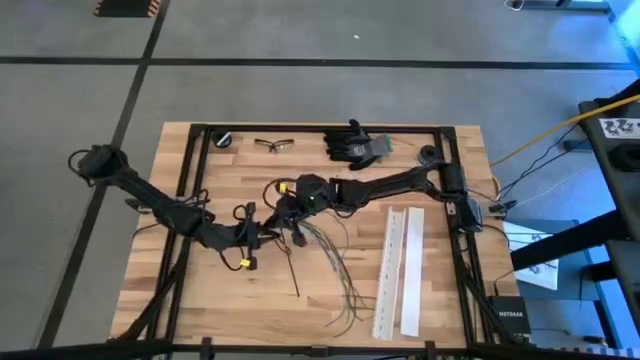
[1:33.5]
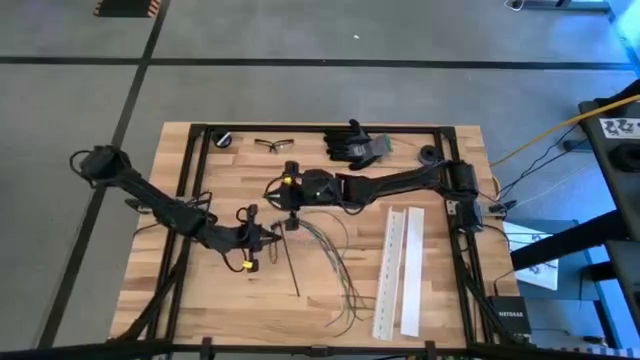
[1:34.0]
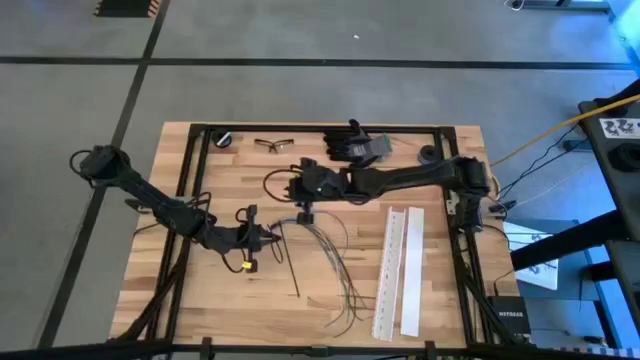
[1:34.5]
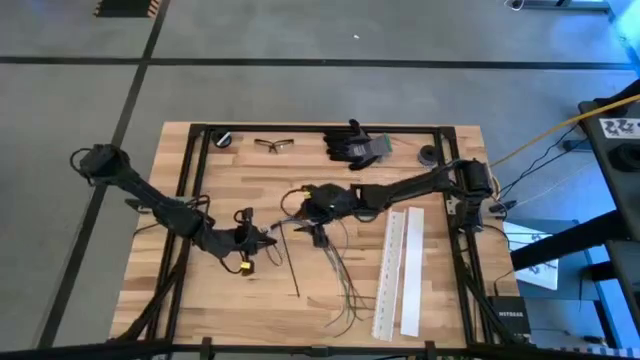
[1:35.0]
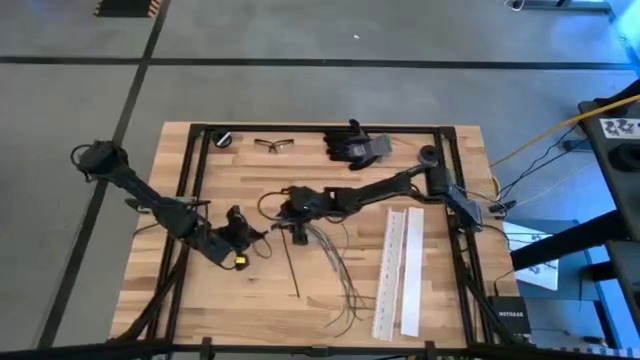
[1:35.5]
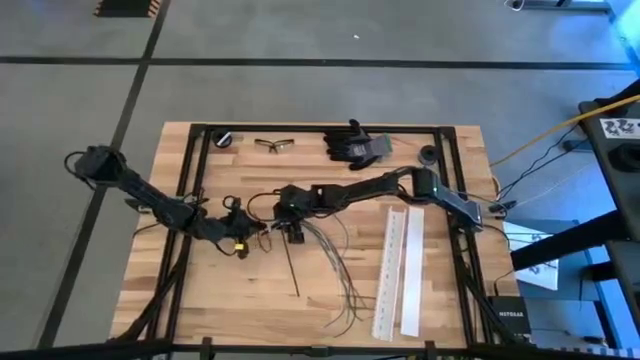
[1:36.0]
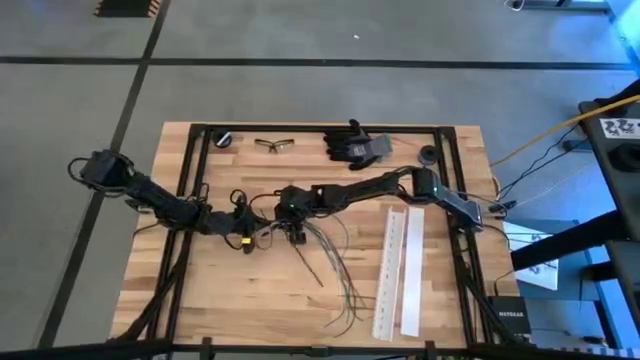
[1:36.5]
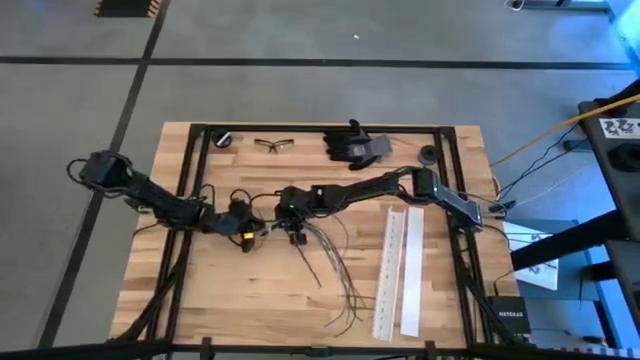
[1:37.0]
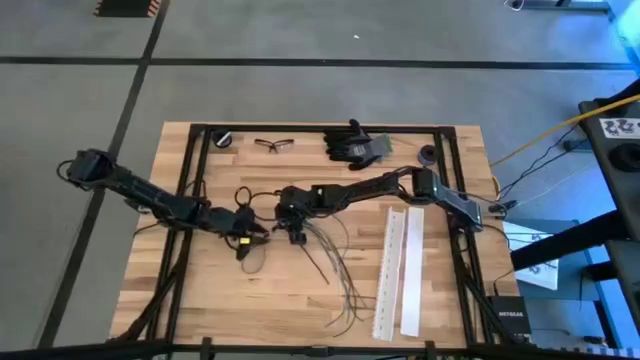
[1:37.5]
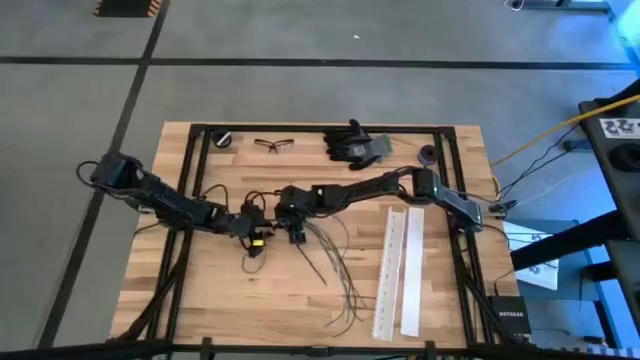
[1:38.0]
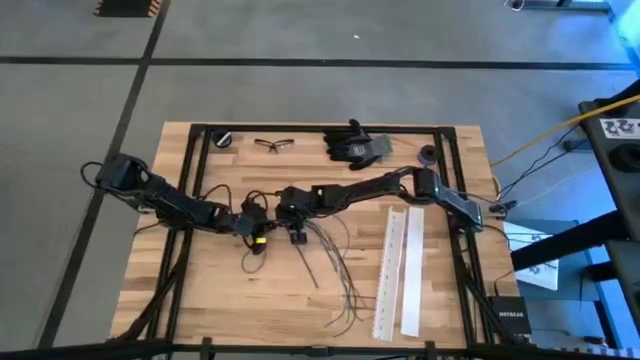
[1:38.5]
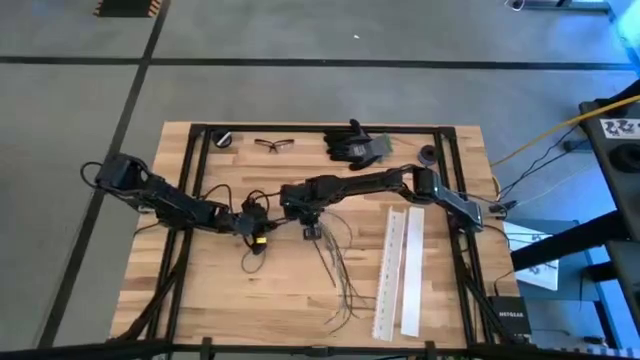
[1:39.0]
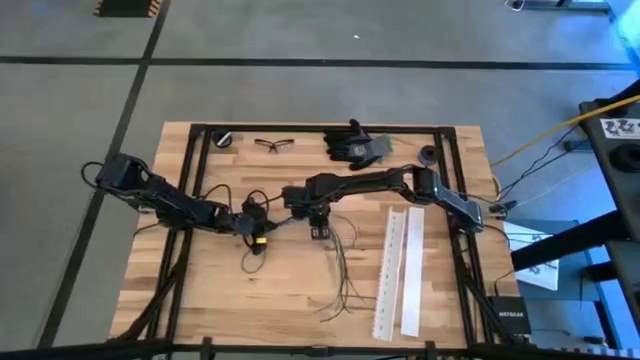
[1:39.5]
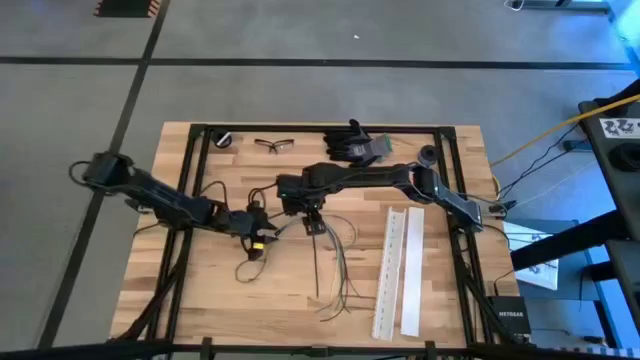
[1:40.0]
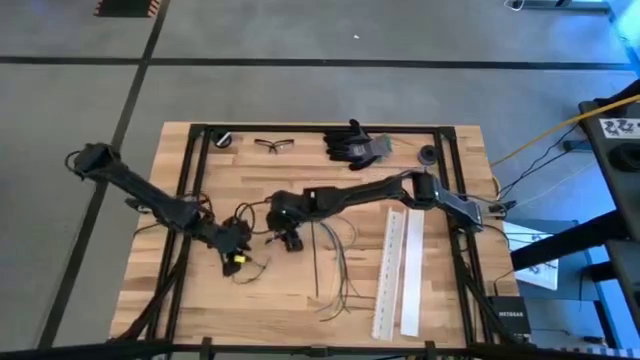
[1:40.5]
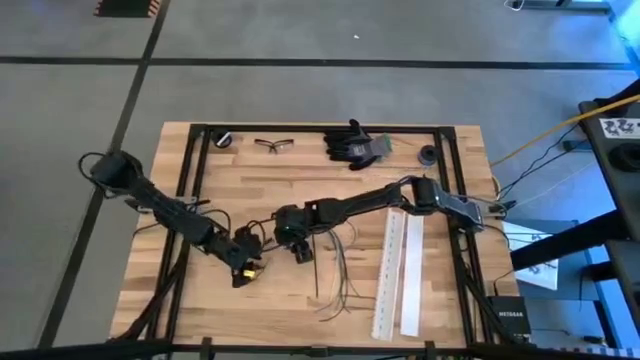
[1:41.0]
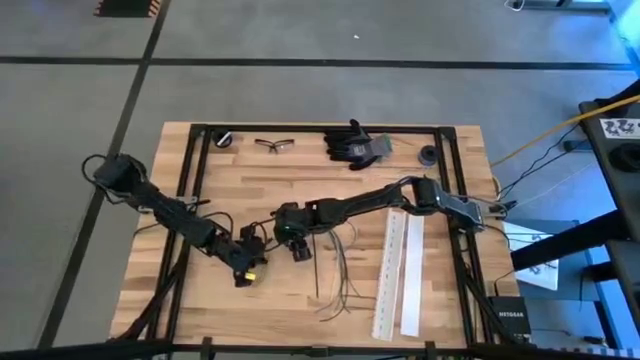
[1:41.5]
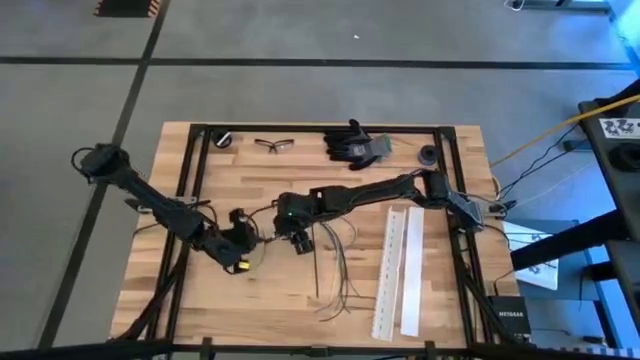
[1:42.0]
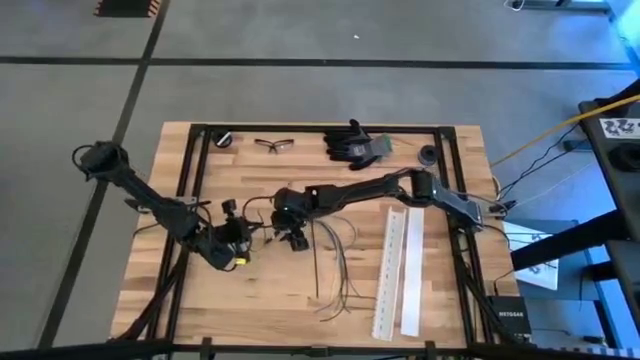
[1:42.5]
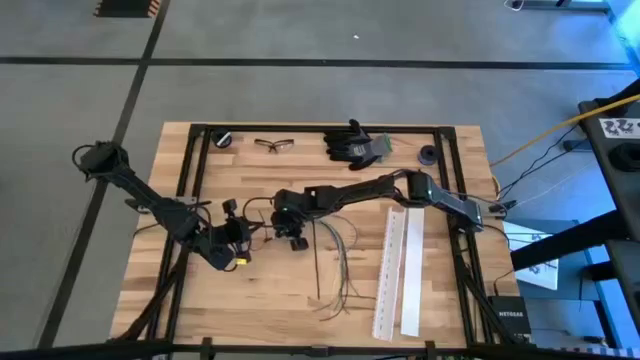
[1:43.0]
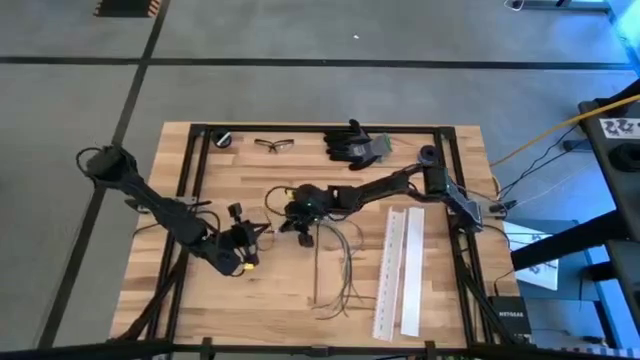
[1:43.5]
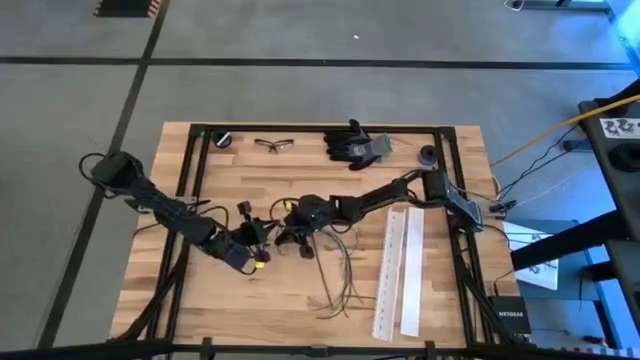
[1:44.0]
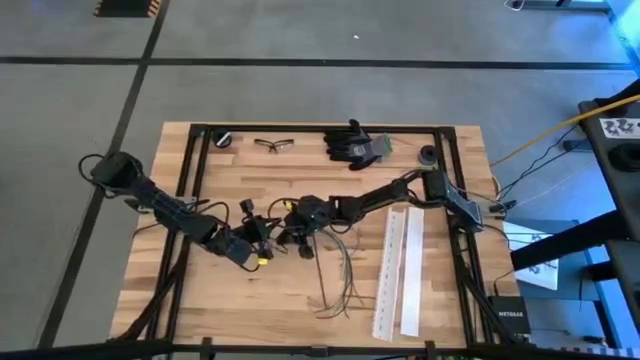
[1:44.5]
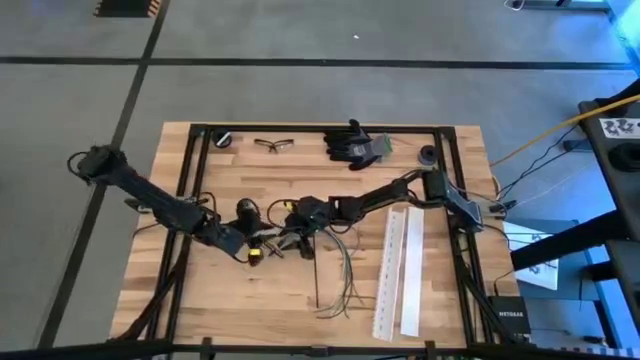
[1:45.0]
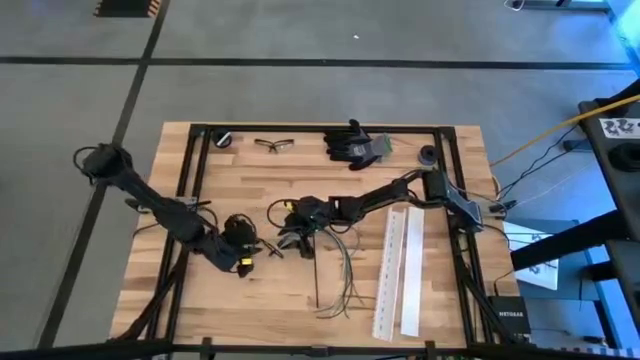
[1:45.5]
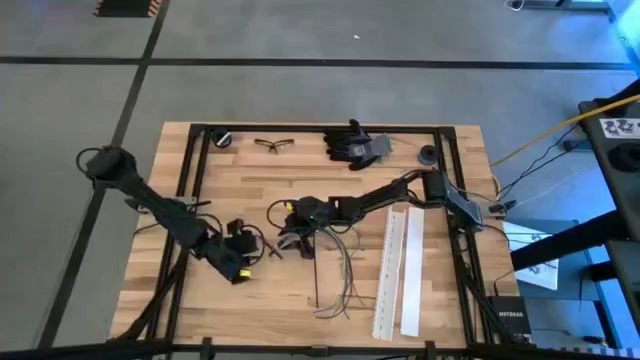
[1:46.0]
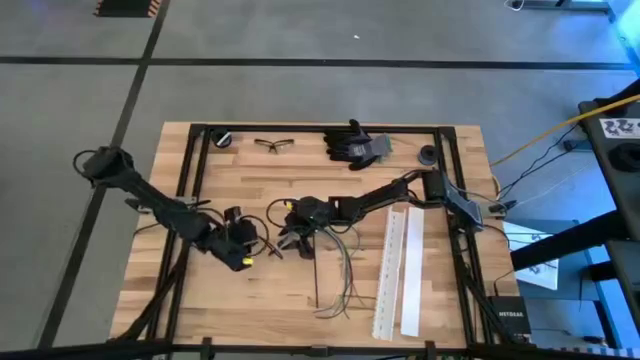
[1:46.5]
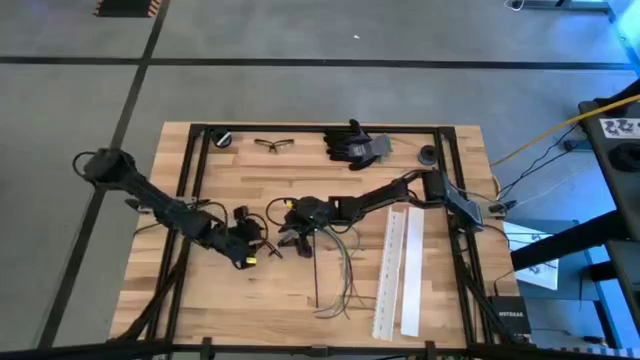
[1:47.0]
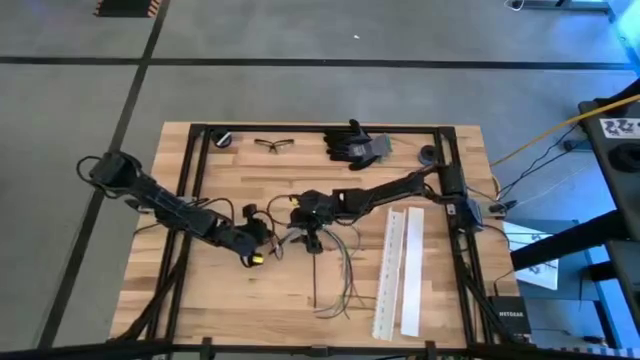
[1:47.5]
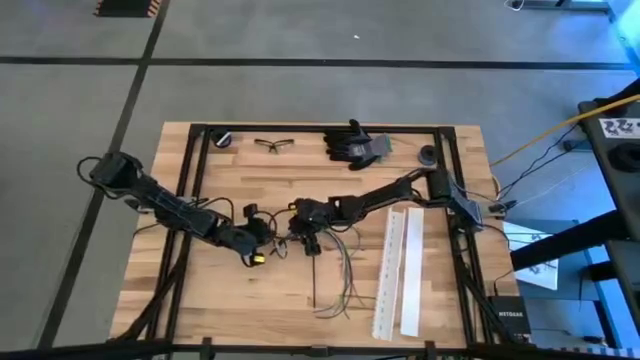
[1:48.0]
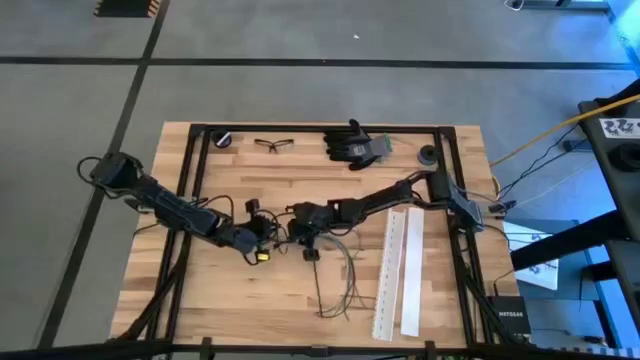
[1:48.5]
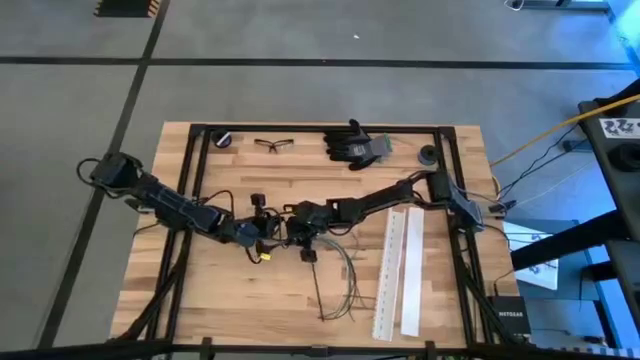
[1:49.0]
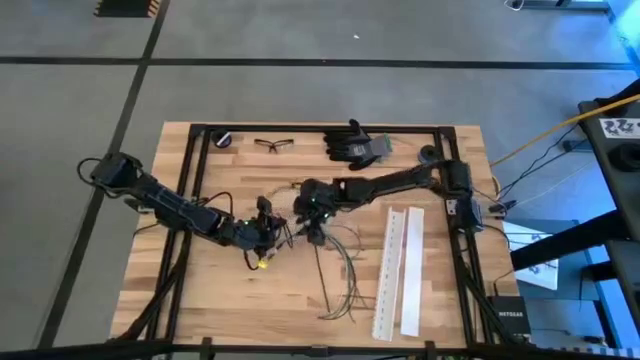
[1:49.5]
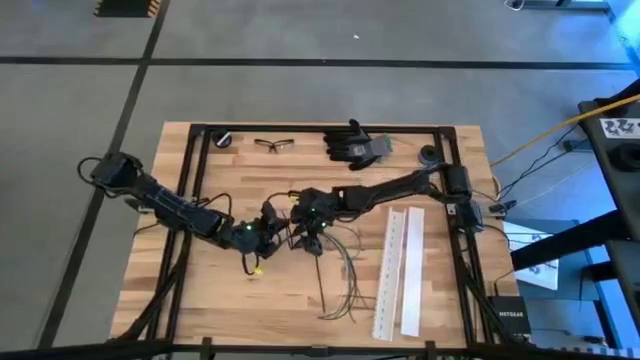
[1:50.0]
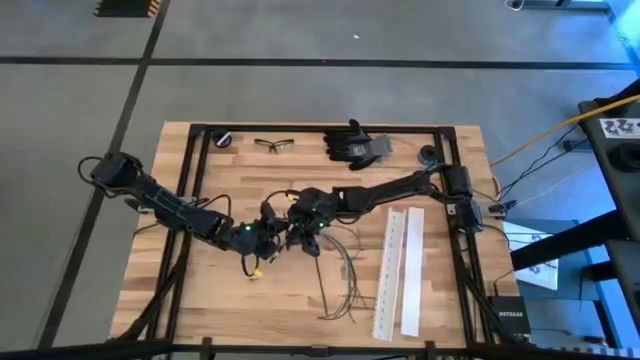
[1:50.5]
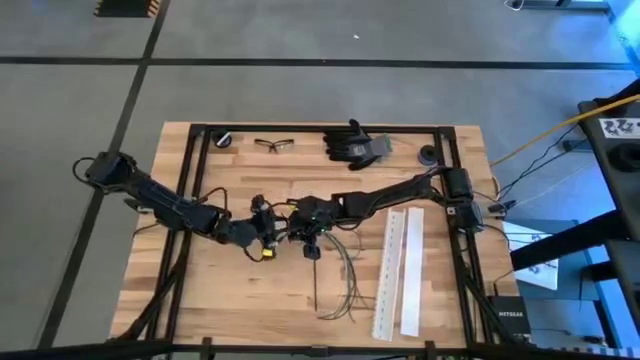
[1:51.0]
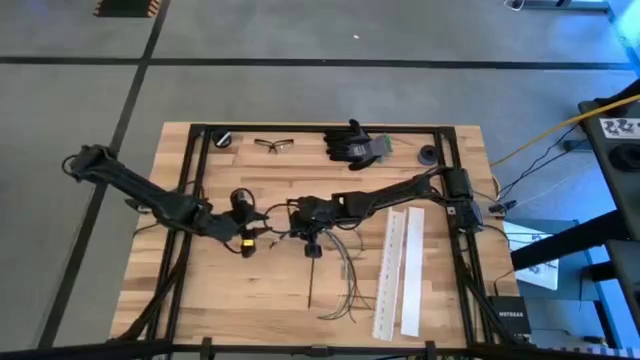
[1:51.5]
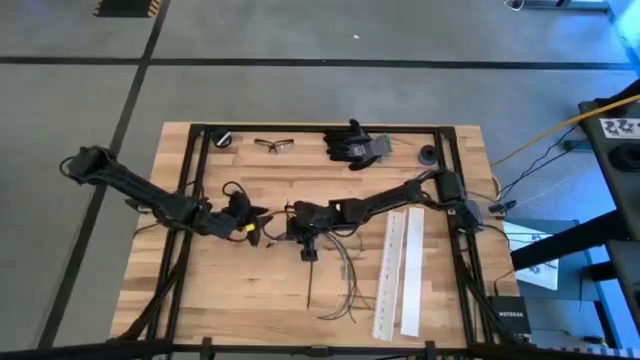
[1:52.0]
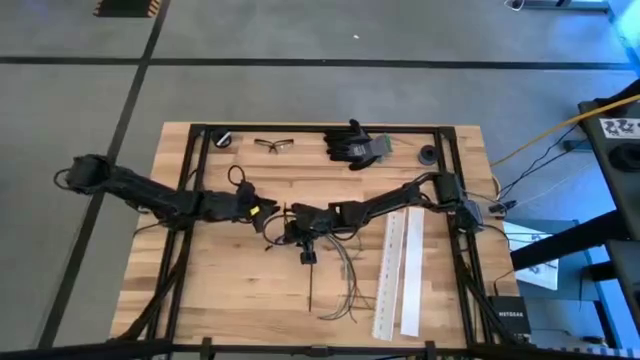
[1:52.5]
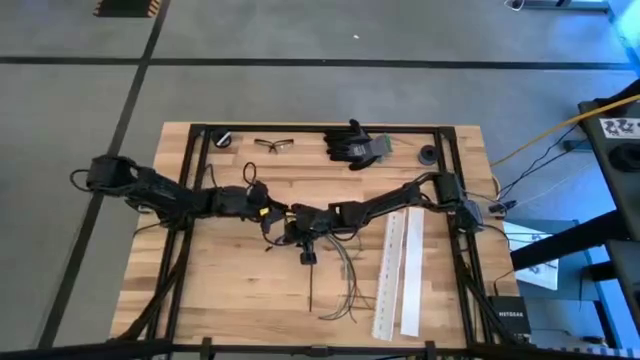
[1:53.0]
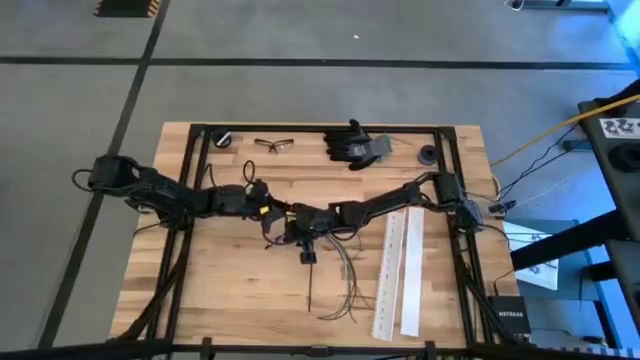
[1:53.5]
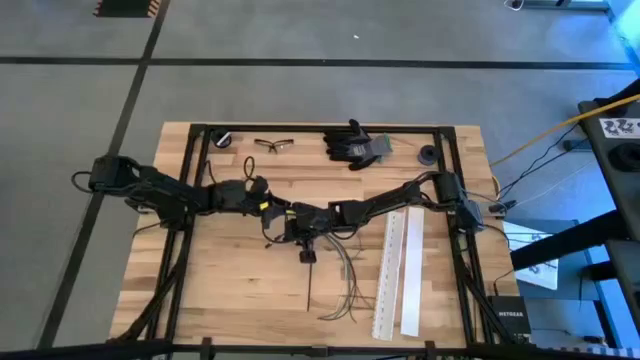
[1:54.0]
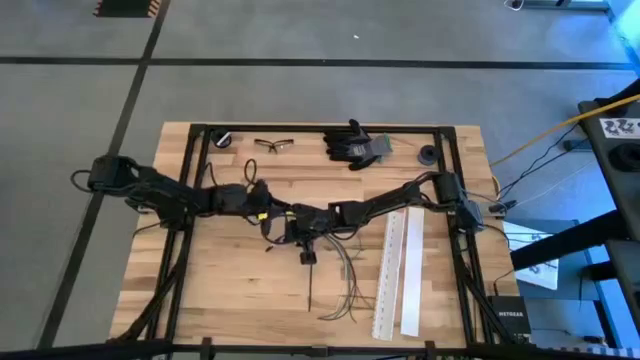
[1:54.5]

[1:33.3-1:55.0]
Task: Ziptie cables
Wrap the zip tie on the cables

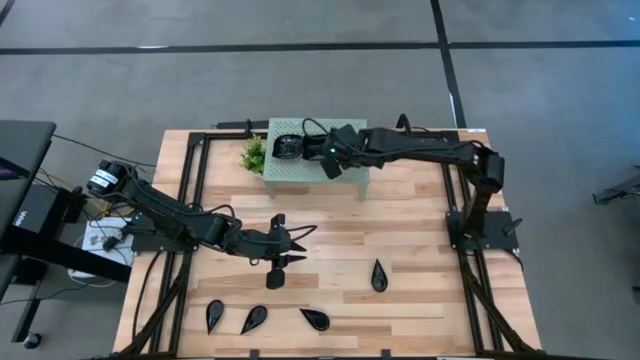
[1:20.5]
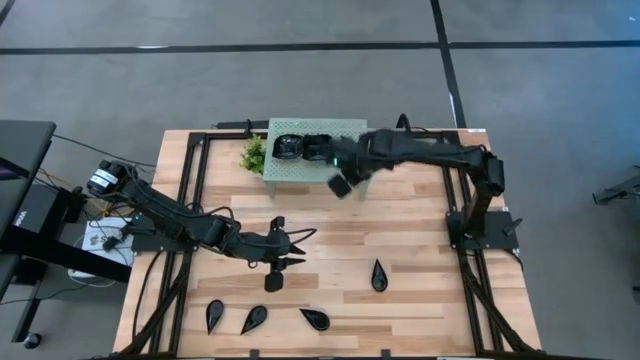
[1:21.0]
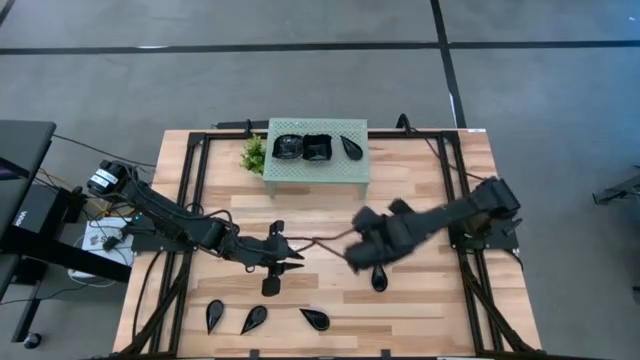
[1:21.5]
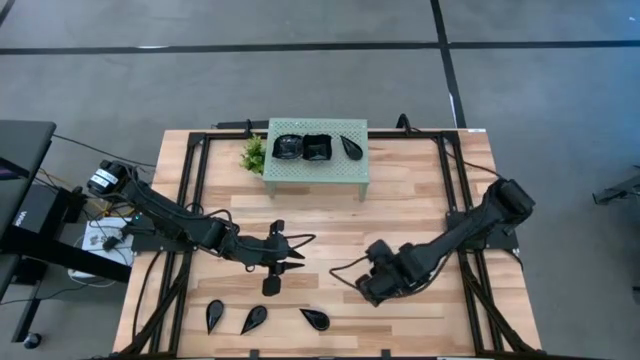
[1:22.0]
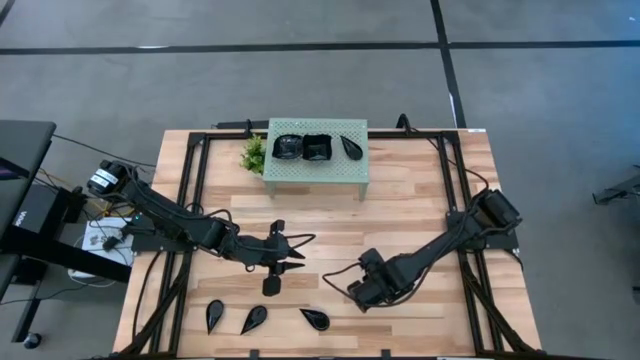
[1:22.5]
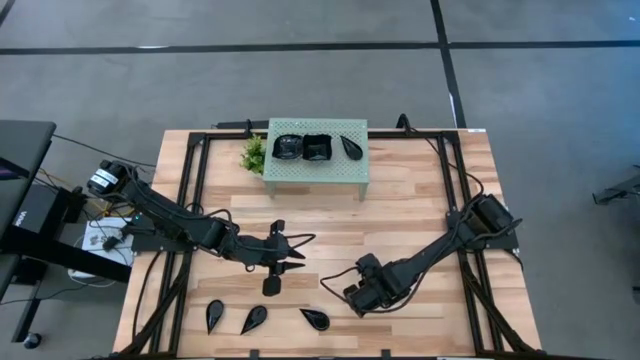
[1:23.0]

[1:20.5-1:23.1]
Task: Pick & Place Mini shaped plates
Stack the drop-shaped plate on top of the other drop-shaped plate on the shelf
